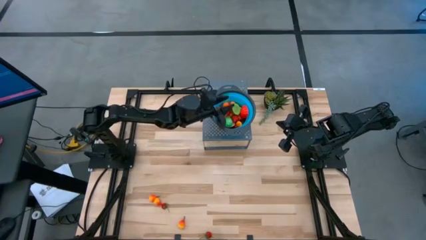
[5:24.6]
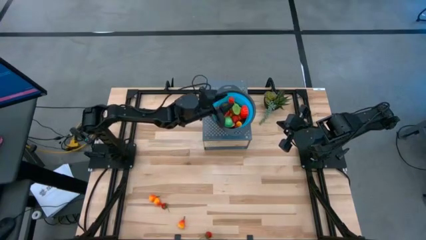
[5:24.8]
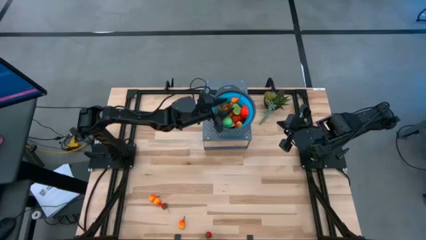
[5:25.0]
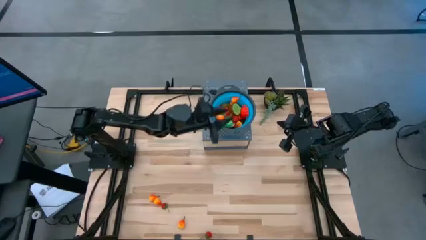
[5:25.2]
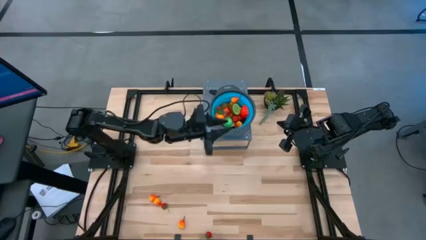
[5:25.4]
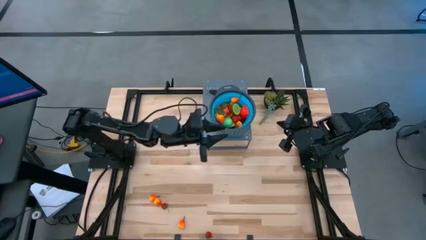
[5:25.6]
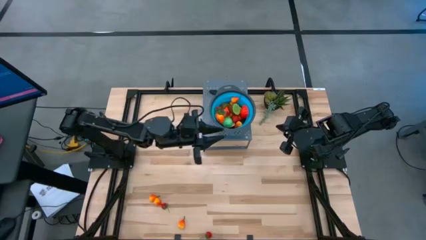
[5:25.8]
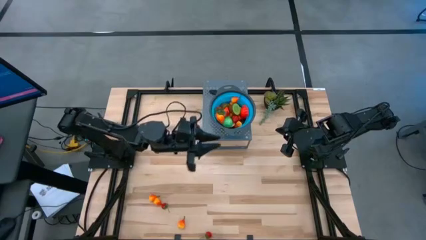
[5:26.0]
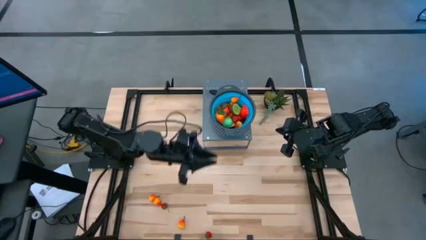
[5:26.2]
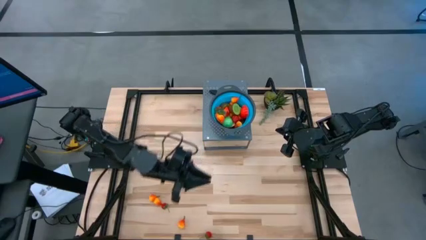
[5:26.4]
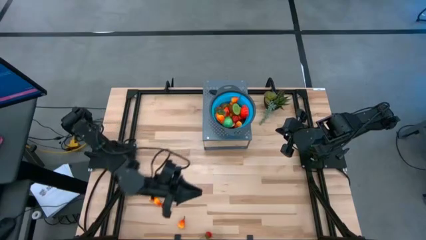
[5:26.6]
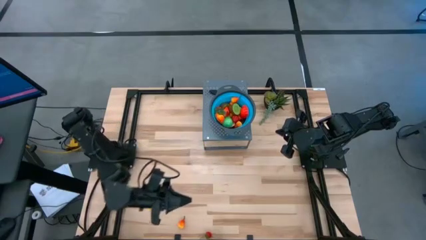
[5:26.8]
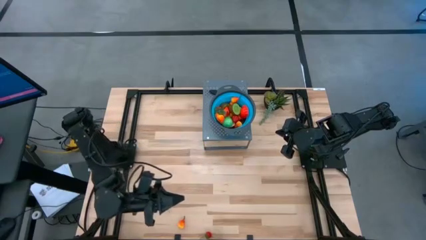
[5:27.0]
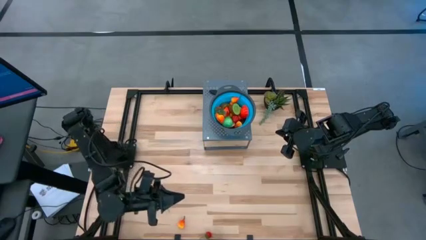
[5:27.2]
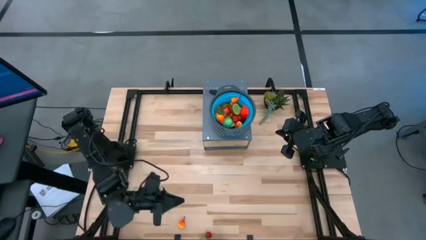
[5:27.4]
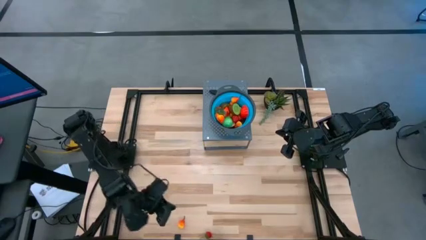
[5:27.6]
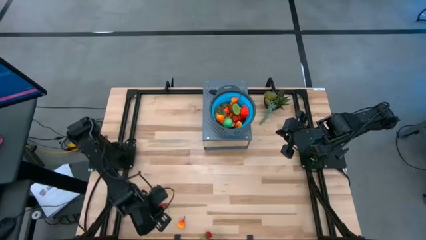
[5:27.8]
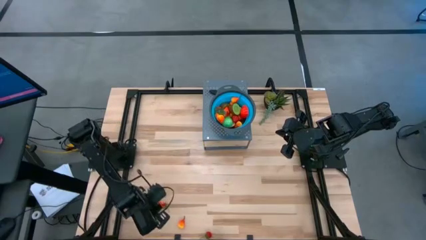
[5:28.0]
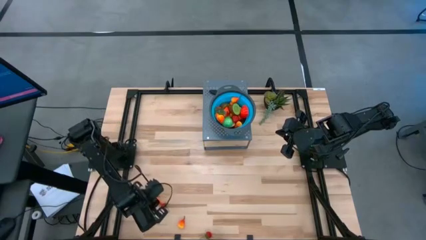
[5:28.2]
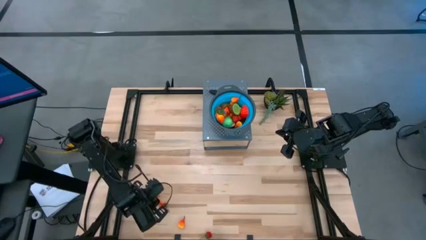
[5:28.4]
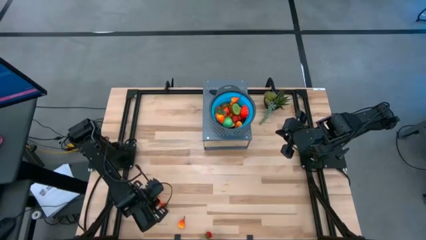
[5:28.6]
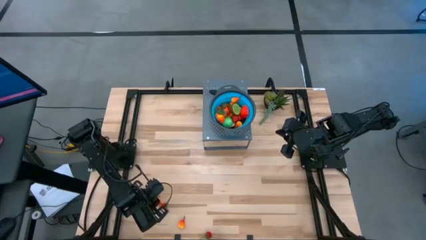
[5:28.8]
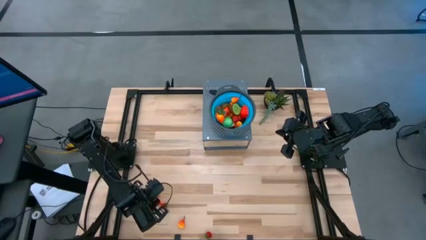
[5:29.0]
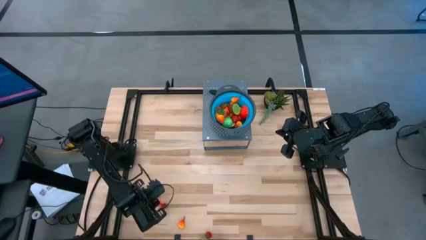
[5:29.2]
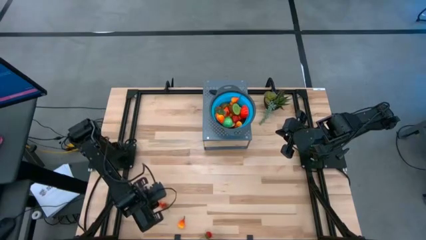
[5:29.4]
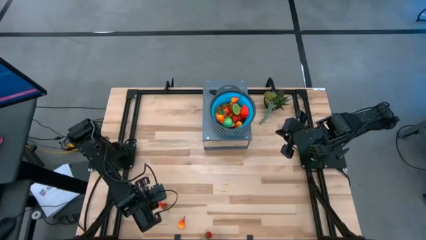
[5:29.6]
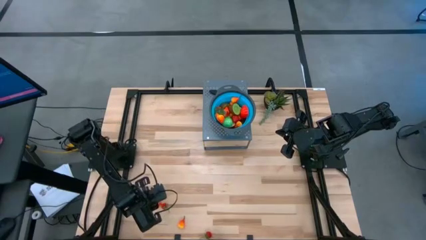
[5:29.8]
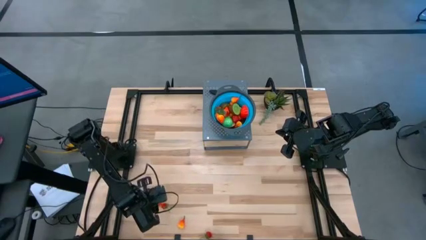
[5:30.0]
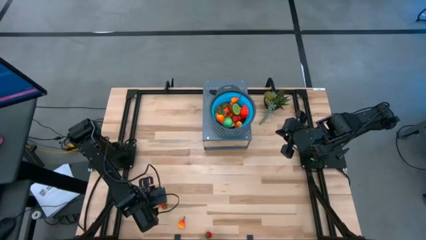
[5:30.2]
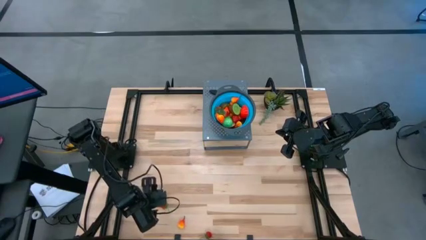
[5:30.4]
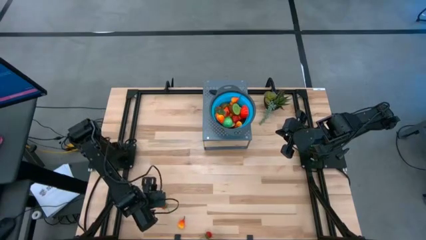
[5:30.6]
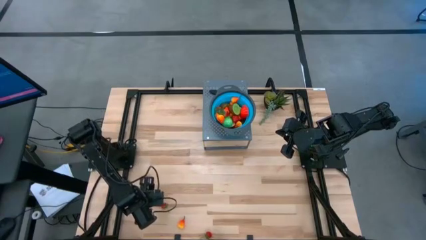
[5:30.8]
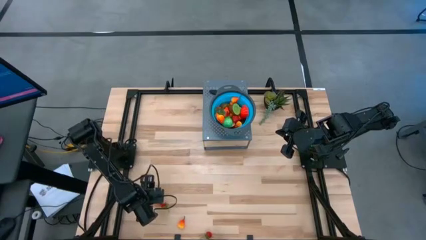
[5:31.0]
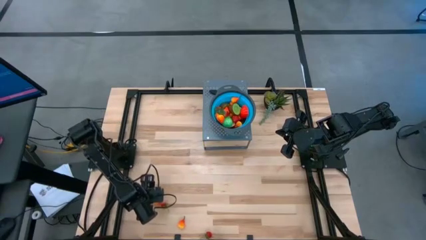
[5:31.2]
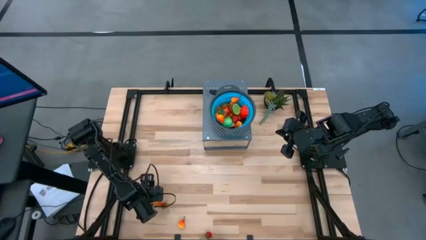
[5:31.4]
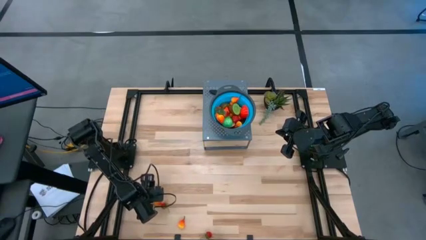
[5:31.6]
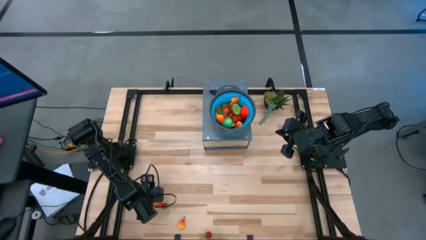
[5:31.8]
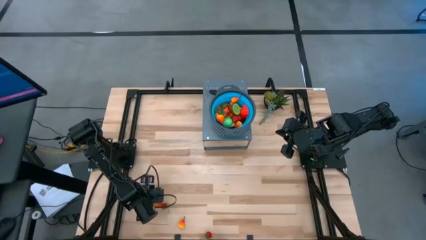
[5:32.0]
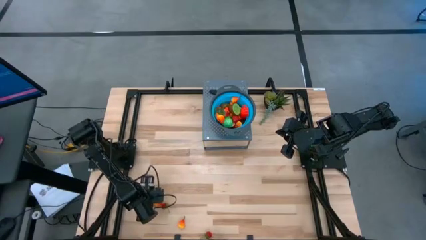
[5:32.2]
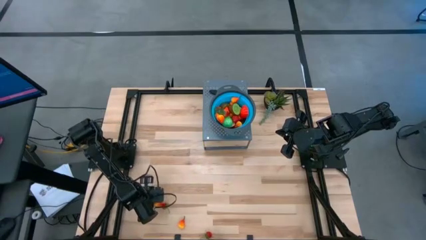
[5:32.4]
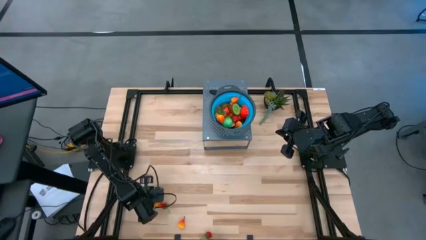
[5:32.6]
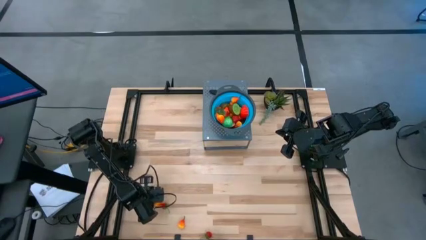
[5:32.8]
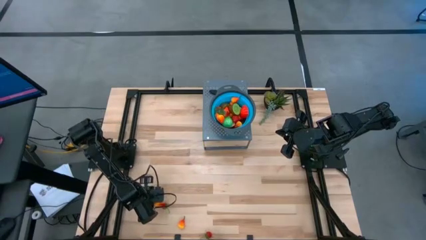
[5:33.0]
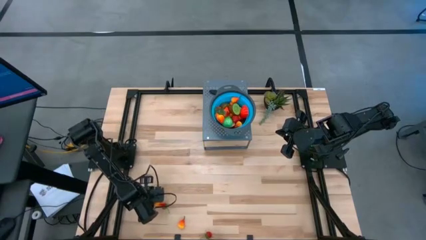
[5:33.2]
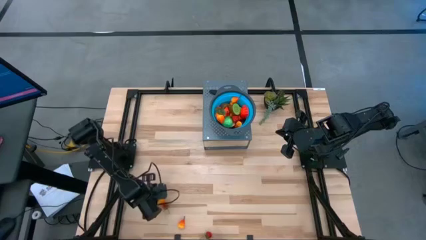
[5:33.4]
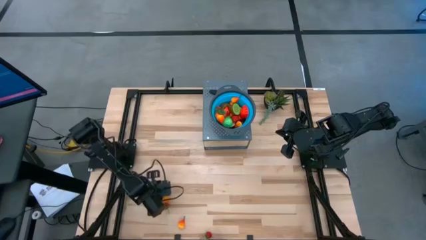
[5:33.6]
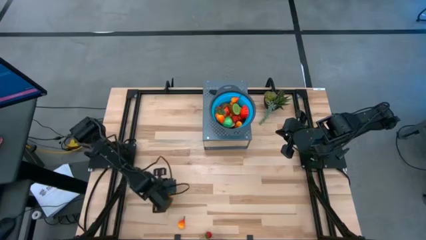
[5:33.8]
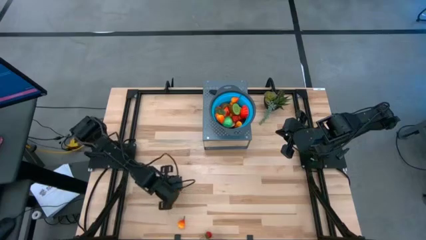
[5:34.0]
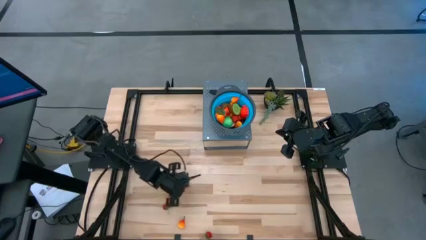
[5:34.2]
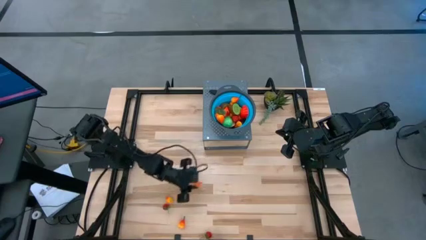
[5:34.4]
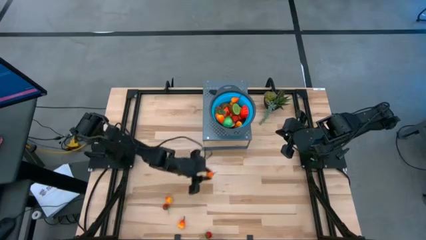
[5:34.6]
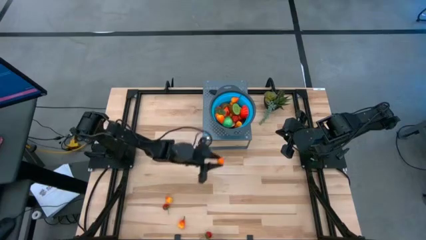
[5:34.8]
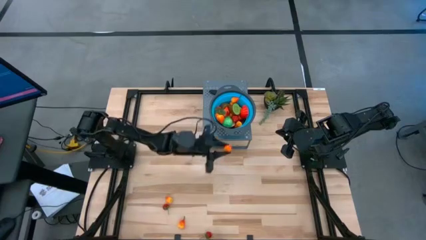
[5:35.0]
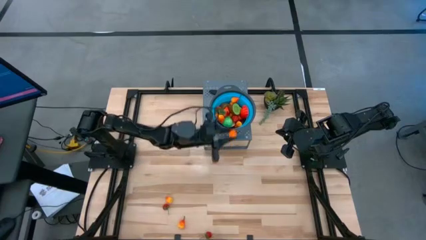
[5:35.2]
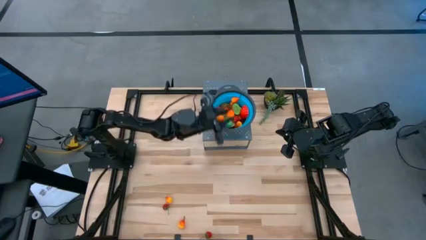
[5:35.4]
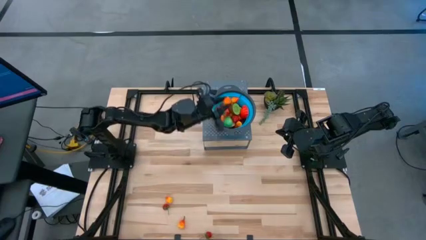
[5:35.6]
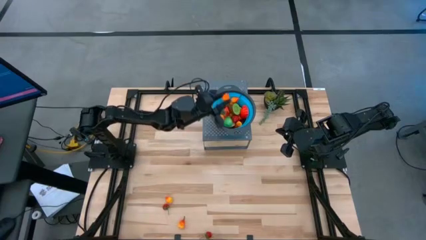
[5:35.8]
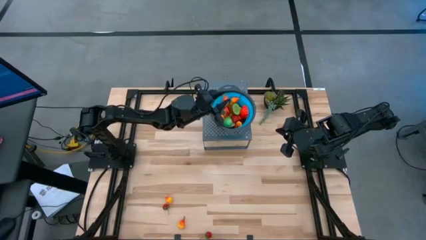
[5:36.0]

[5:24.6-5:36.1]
Task: Pick & Place Fruit
Put the left peach into the strainer bowl
